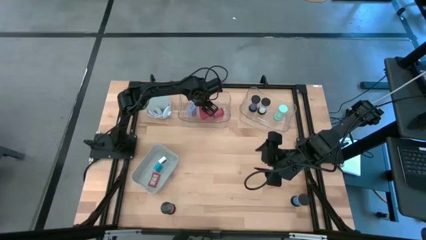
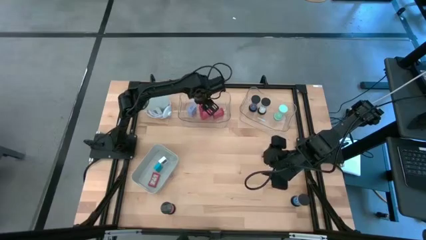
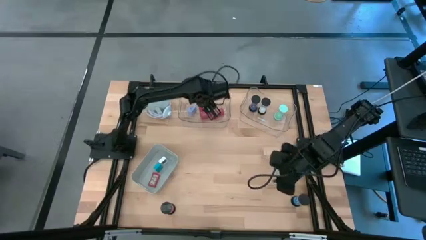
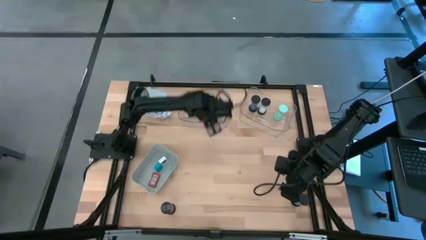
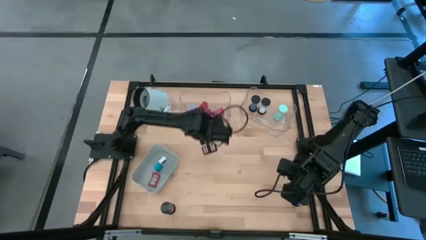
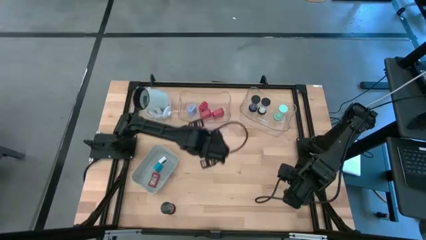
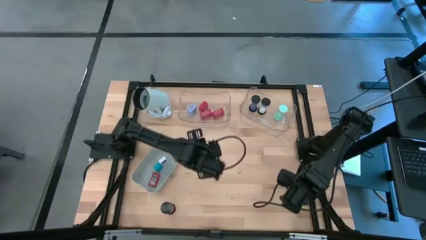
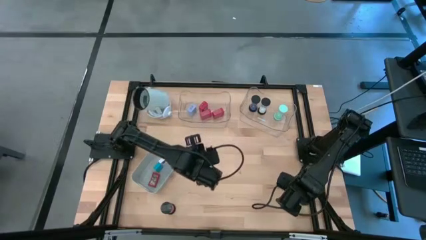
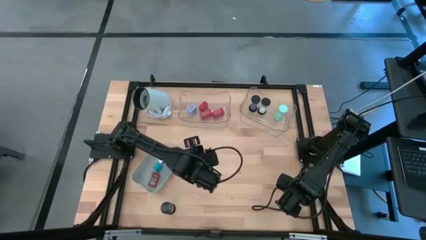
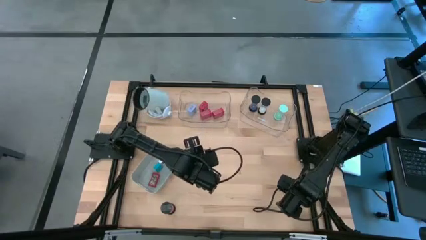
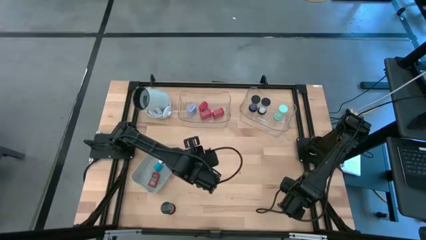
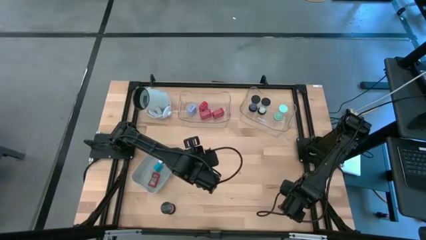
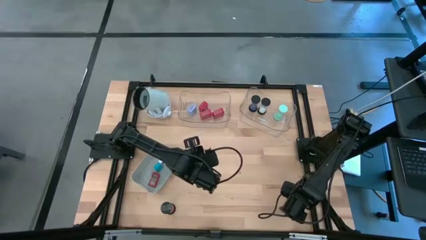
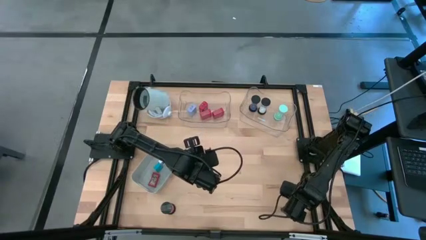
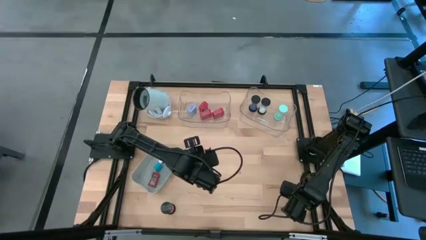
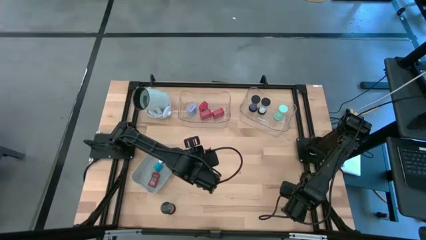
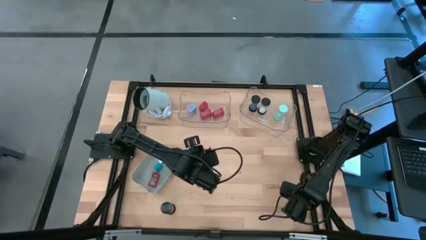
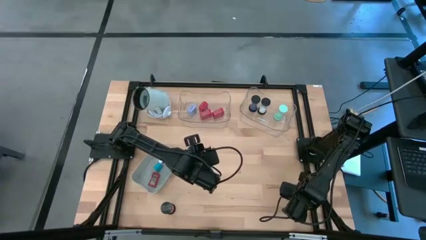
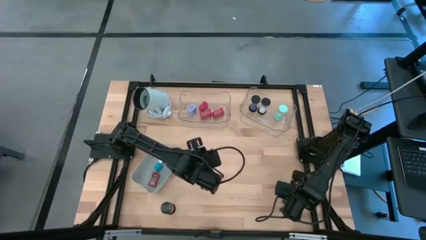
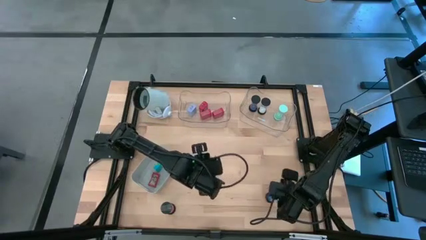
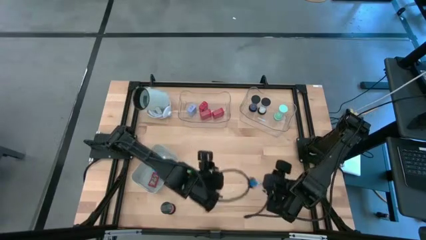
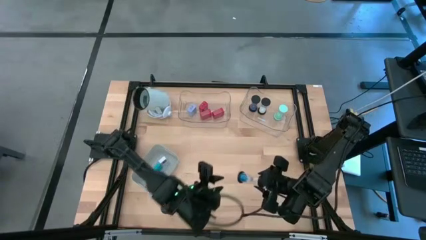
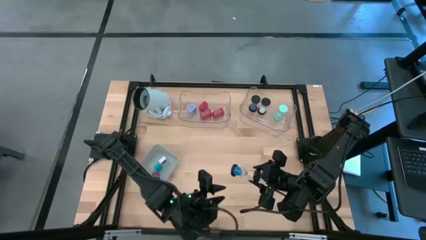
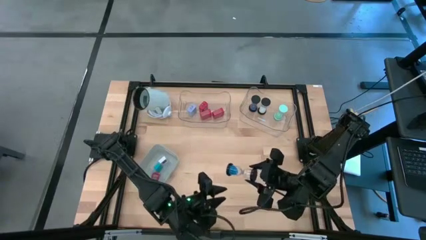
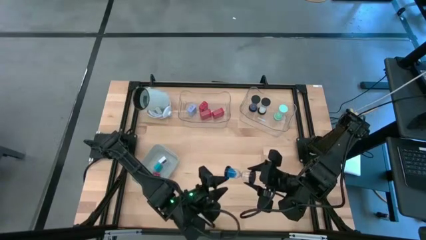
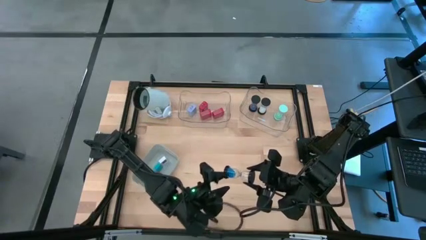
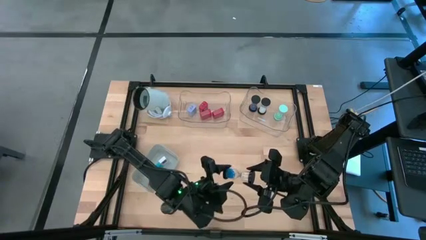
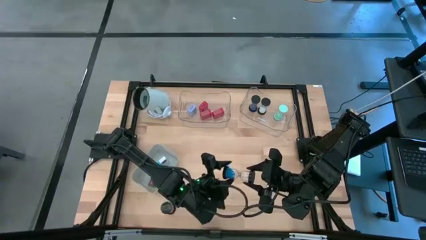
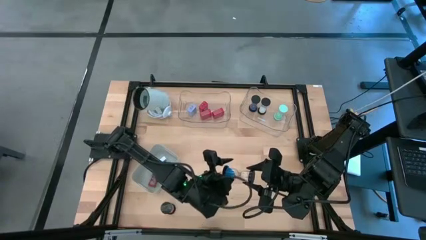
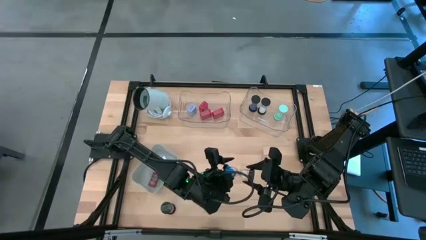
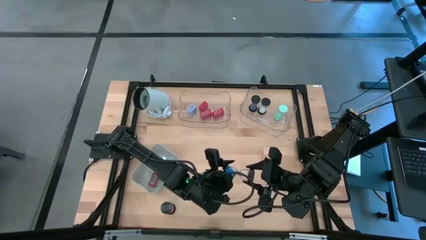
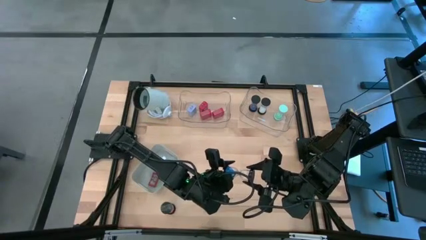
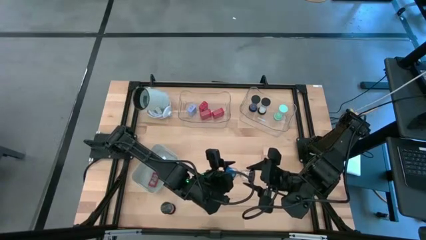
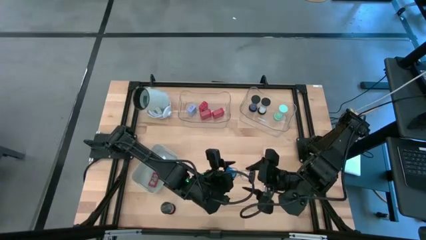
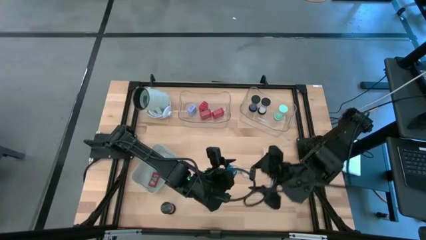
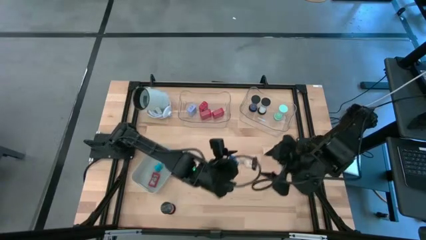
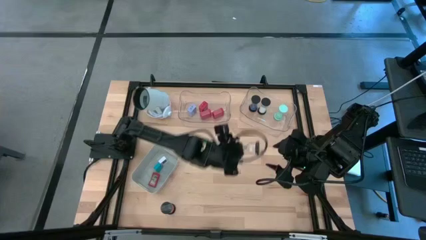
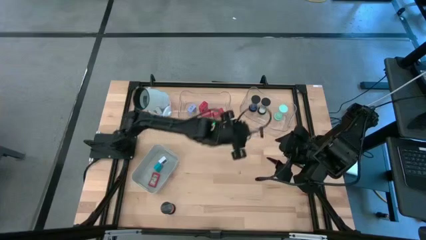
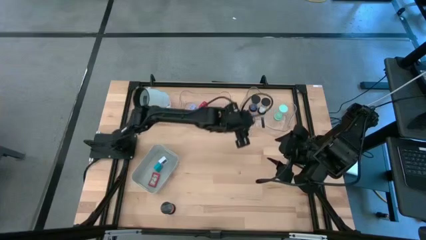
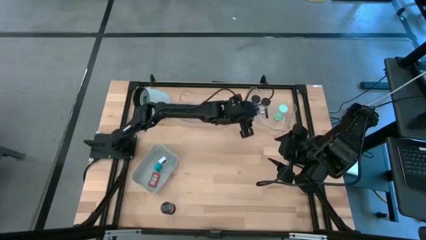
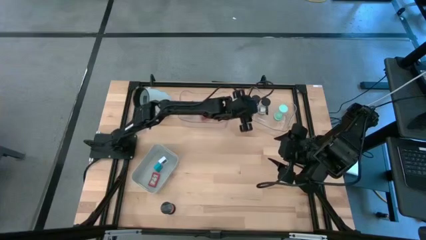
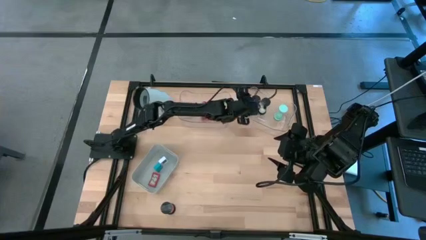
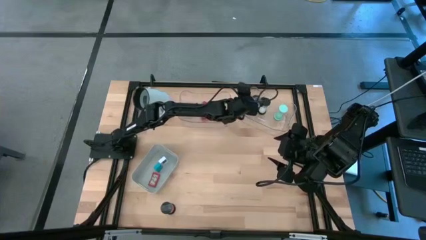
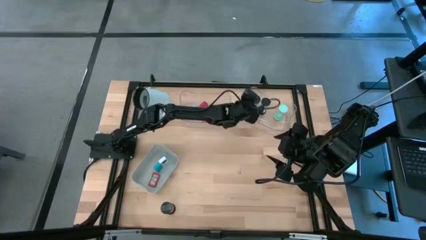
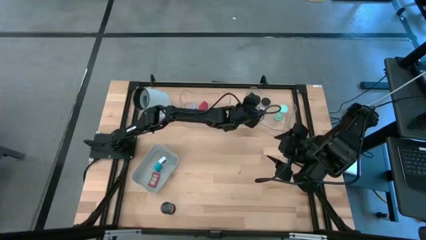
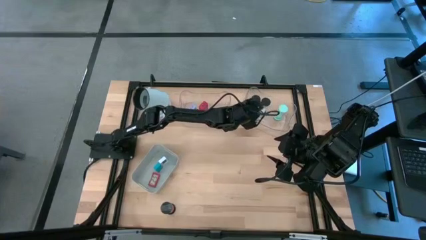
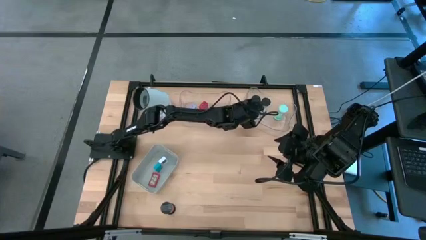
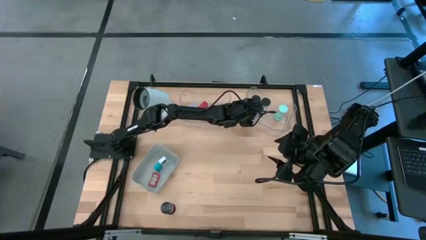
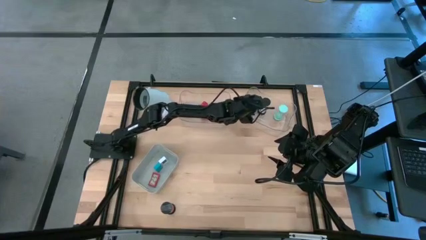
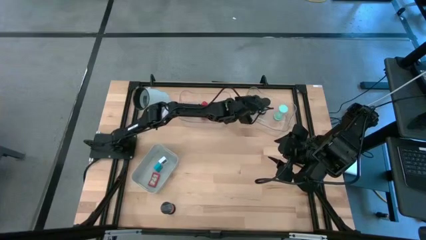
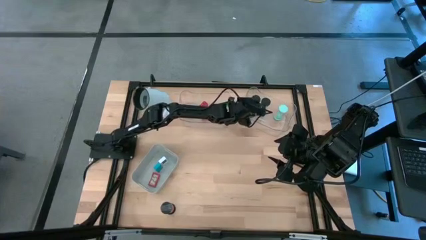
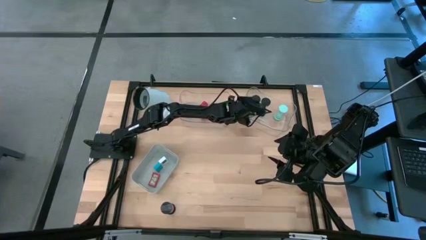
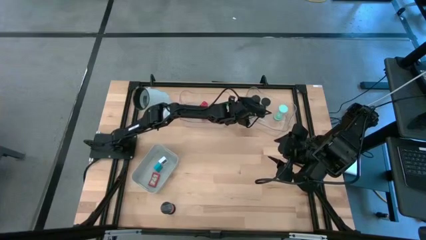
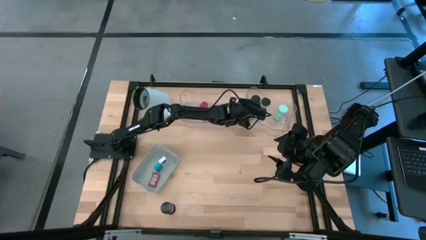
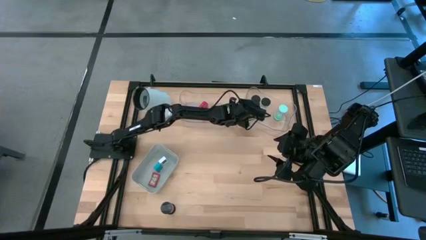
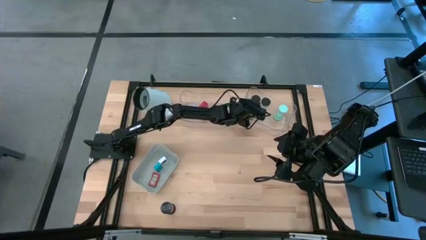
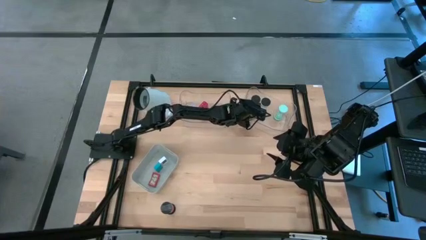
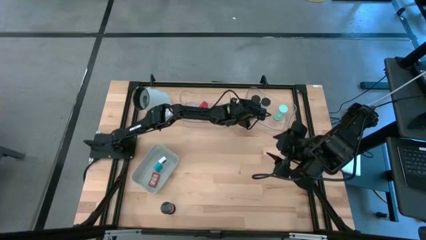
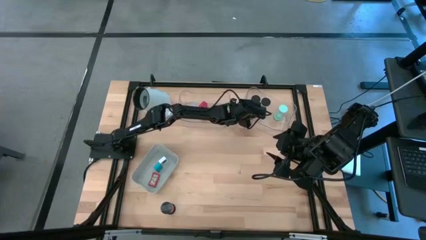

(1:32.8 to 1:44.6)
Task: Pick & Place Office items
Put the blue hourglass into the right transparent bin

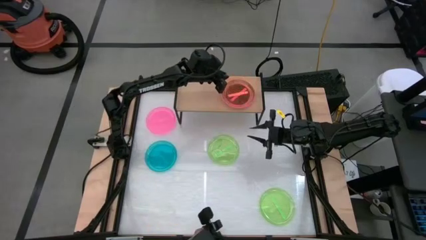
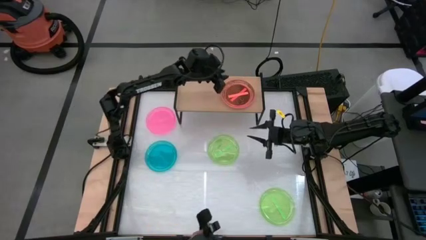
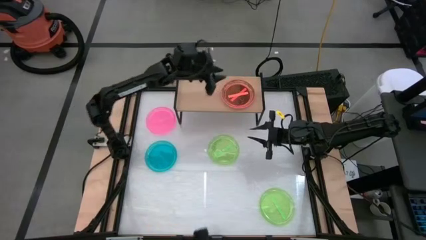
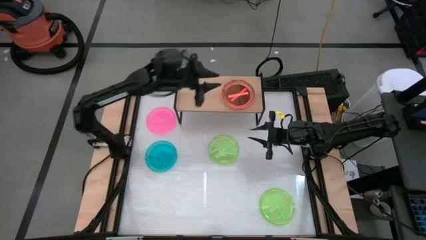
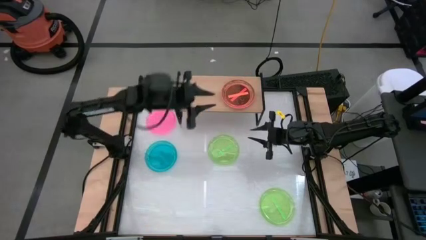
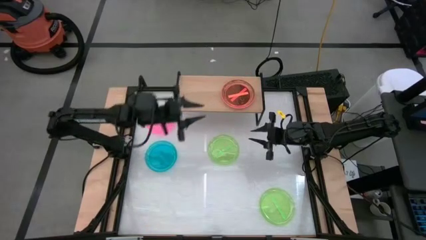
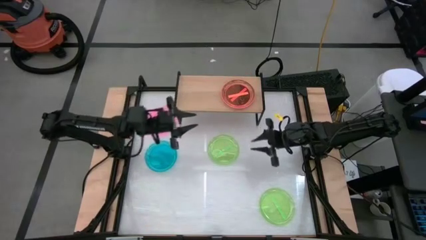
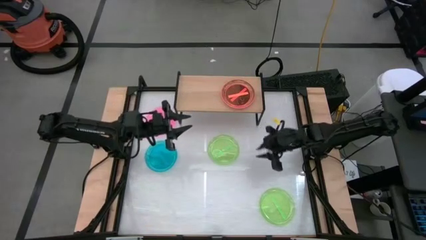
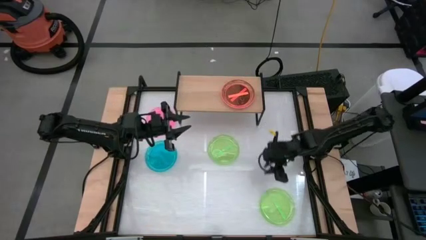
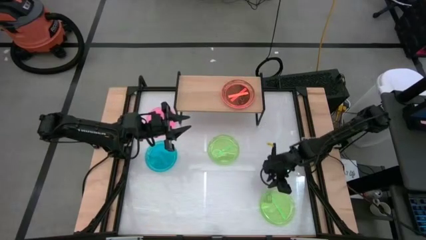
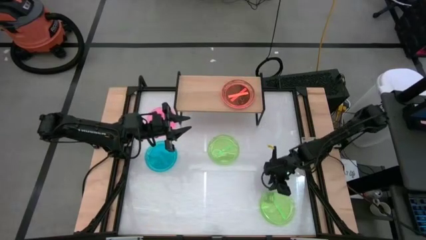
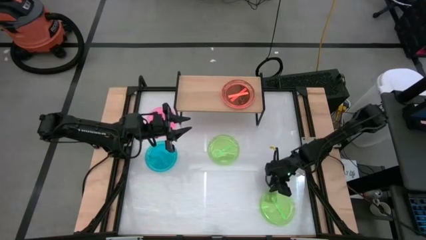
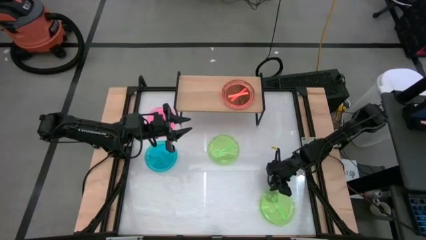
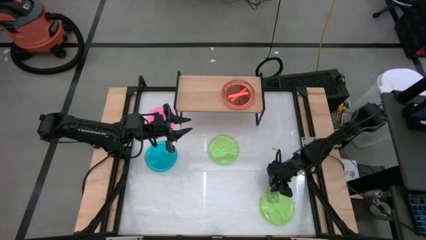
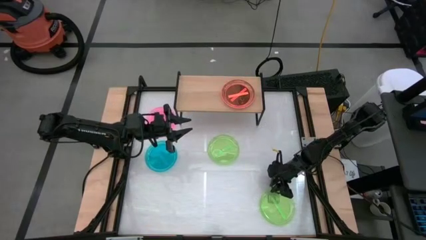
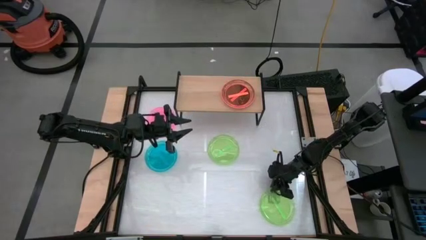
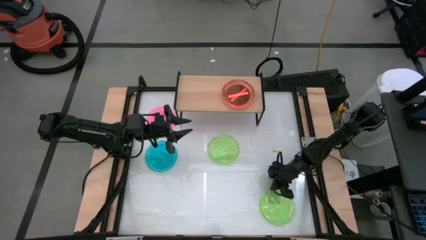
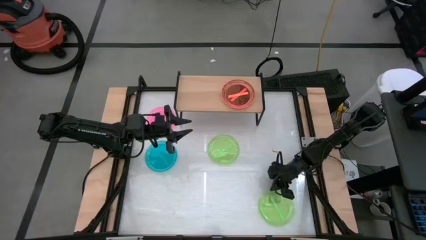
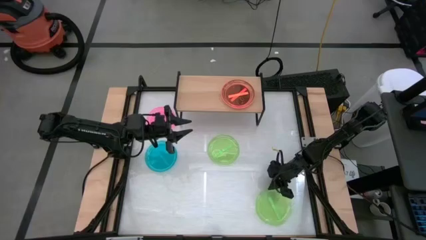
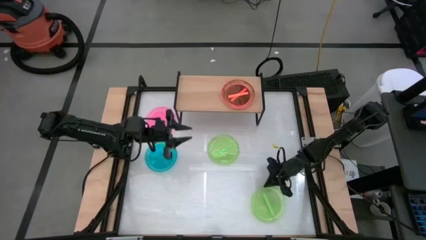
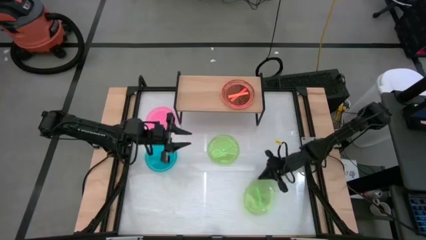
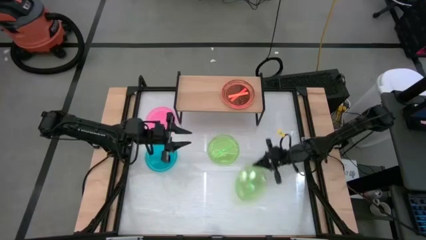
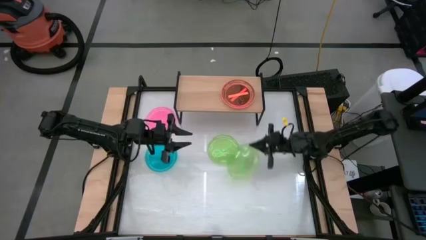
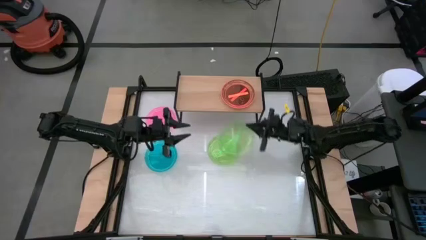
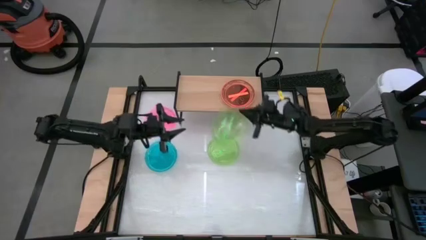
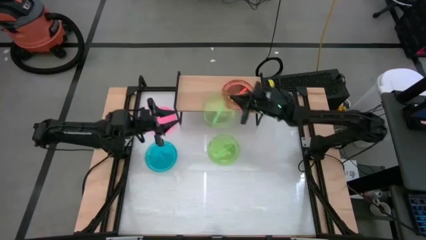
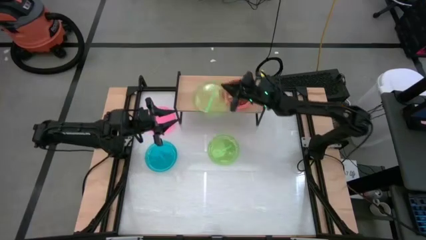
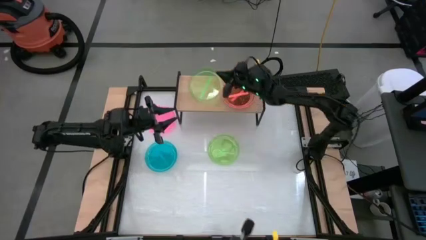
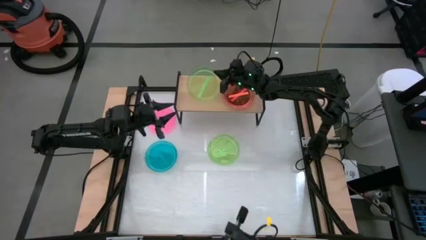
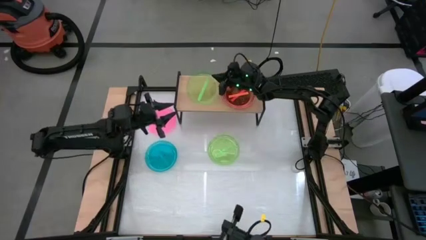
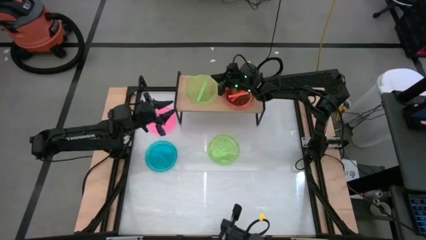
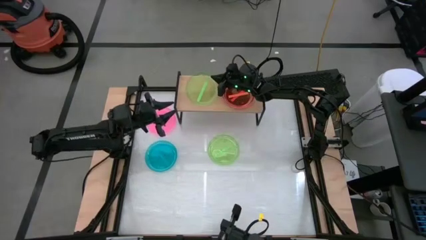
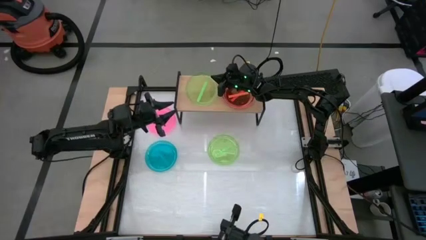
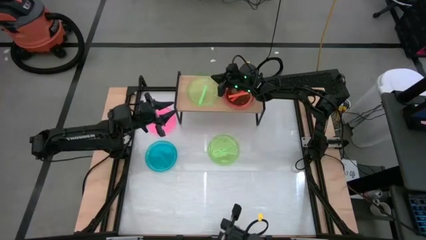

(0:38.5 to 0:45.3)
Task: Place and stack plates onto a shelf
Put the bottom green plate on the shelf
